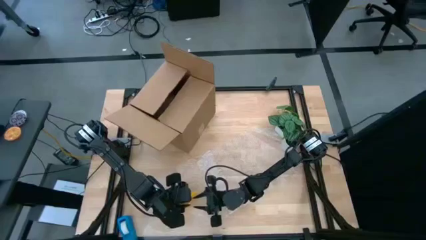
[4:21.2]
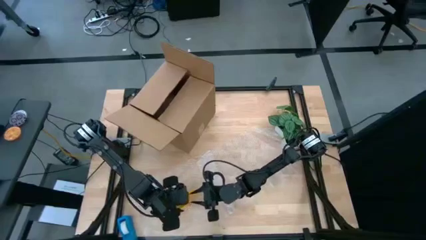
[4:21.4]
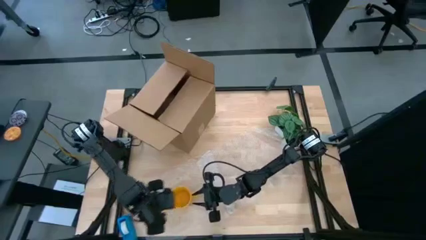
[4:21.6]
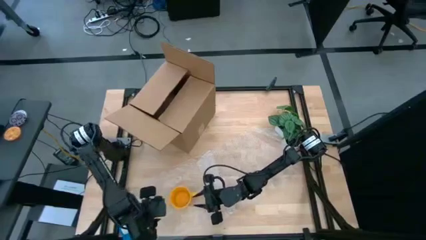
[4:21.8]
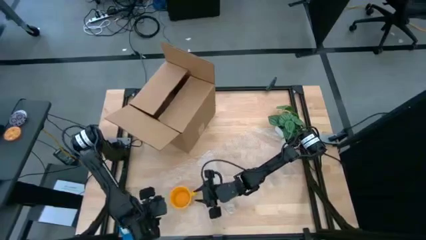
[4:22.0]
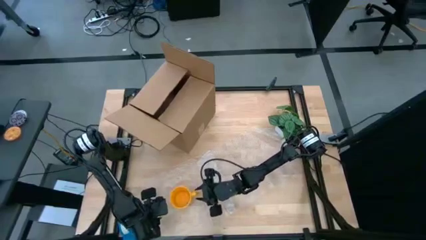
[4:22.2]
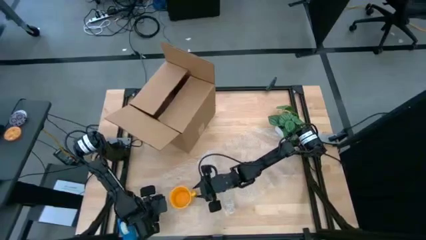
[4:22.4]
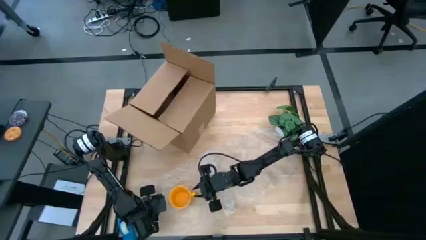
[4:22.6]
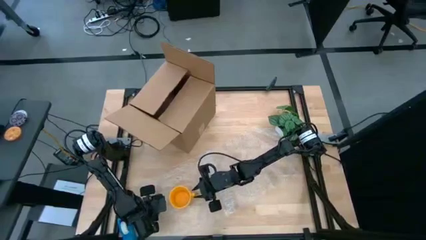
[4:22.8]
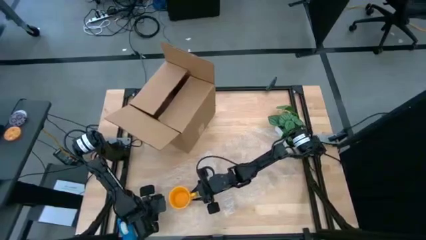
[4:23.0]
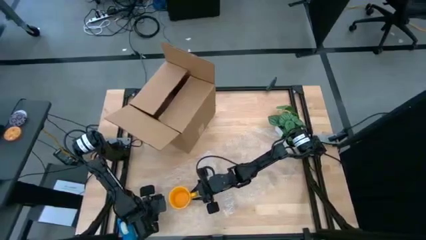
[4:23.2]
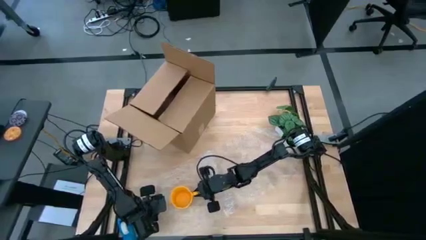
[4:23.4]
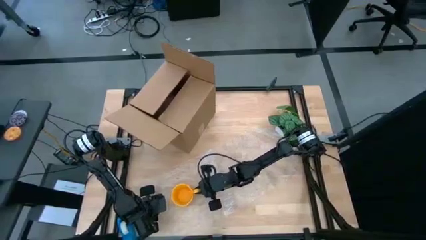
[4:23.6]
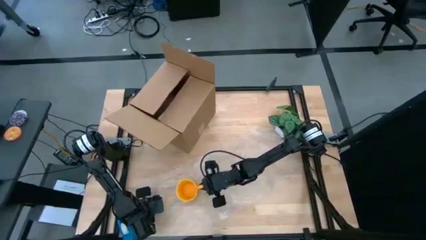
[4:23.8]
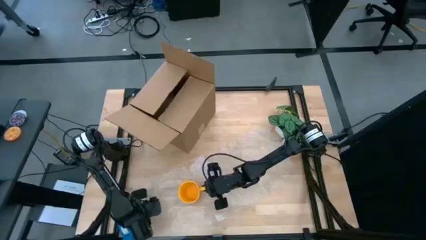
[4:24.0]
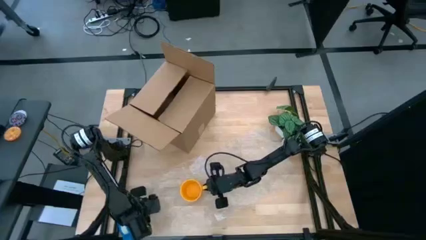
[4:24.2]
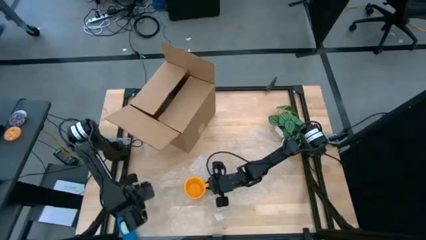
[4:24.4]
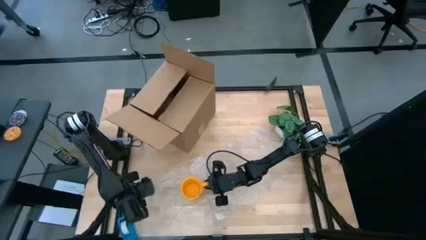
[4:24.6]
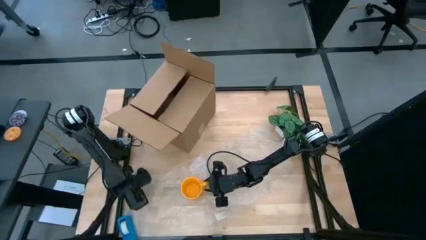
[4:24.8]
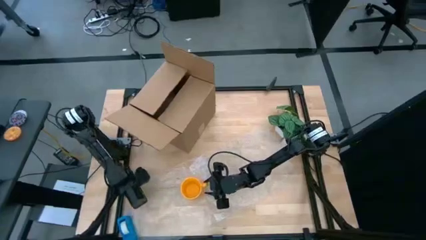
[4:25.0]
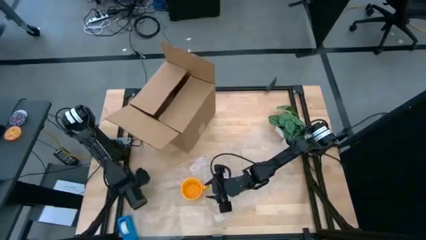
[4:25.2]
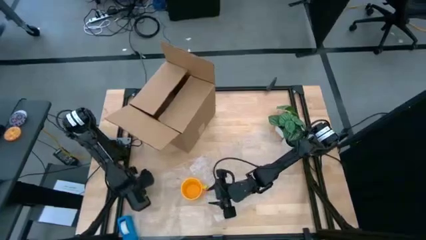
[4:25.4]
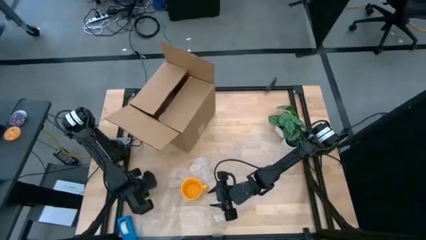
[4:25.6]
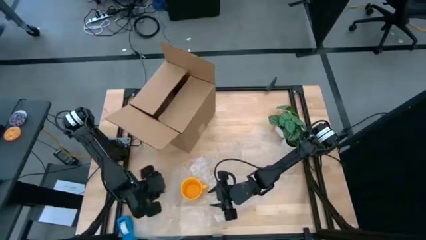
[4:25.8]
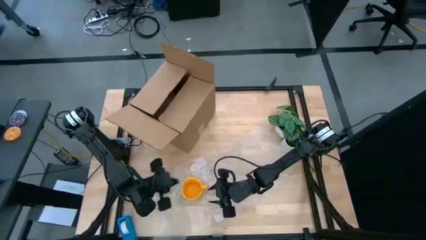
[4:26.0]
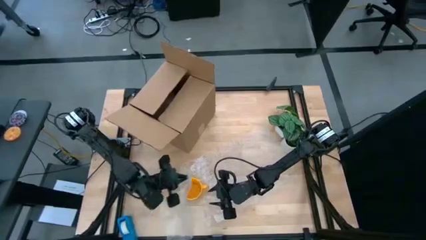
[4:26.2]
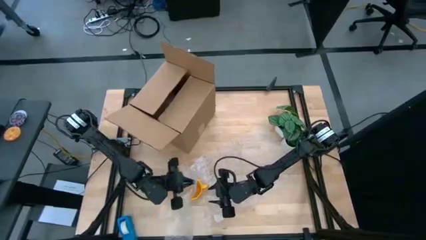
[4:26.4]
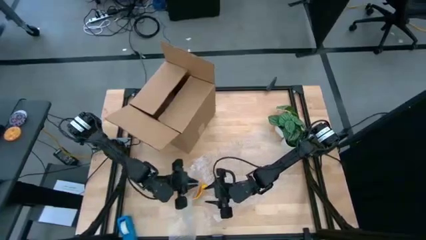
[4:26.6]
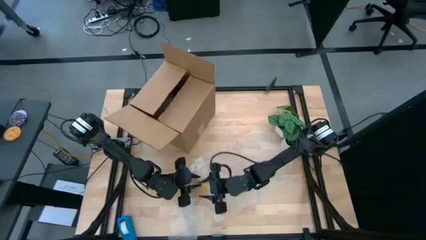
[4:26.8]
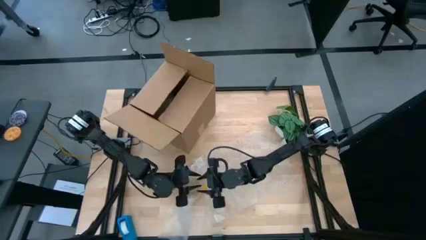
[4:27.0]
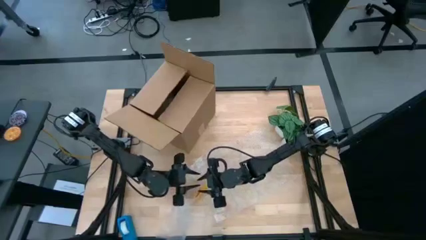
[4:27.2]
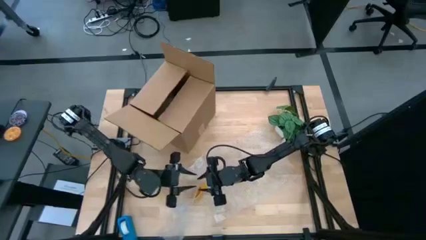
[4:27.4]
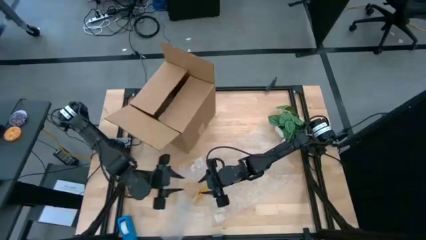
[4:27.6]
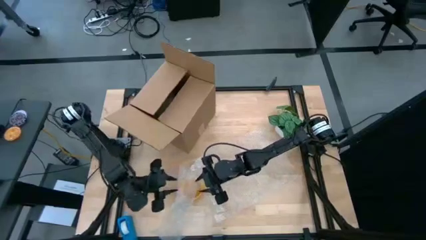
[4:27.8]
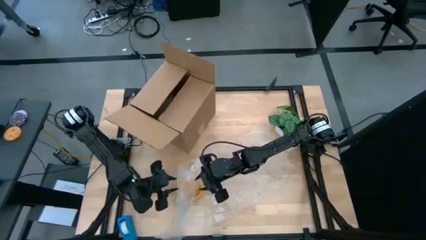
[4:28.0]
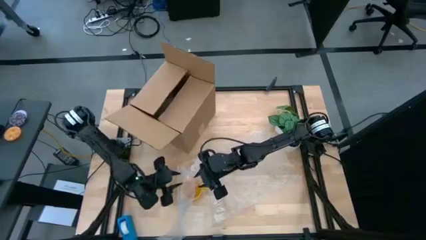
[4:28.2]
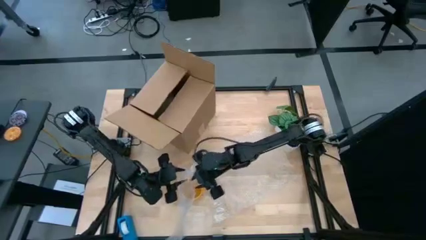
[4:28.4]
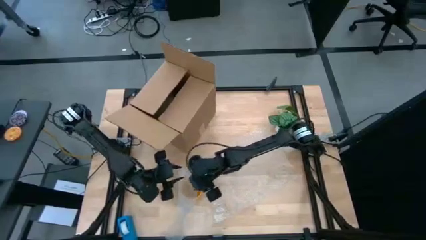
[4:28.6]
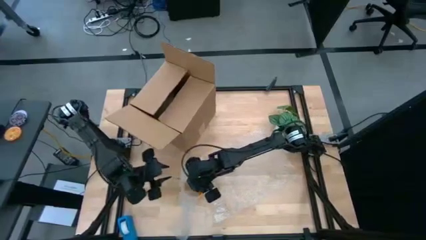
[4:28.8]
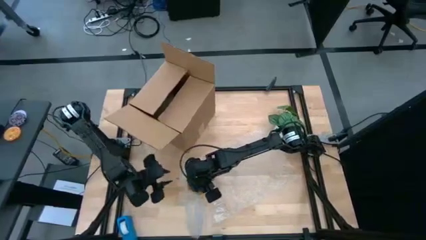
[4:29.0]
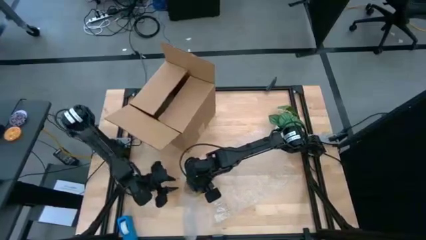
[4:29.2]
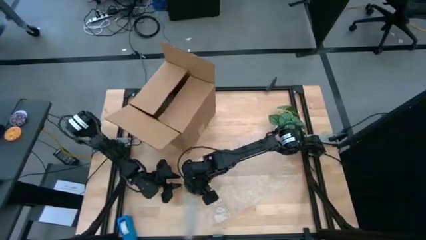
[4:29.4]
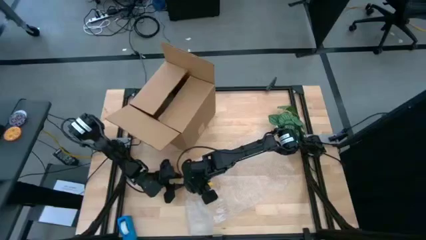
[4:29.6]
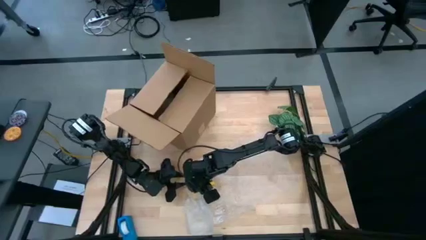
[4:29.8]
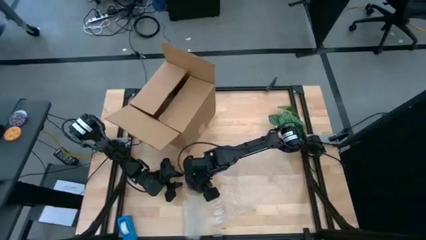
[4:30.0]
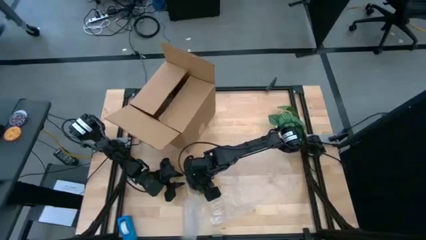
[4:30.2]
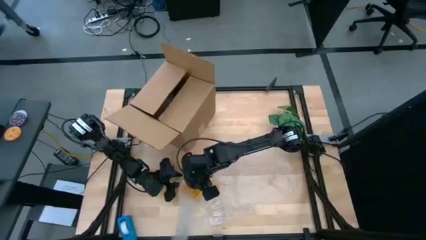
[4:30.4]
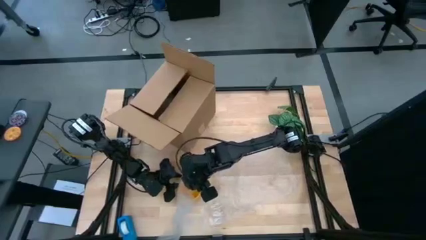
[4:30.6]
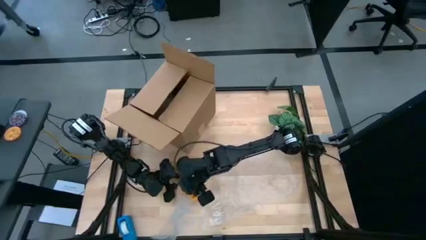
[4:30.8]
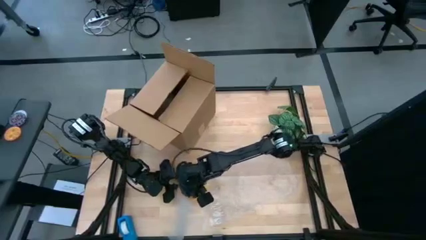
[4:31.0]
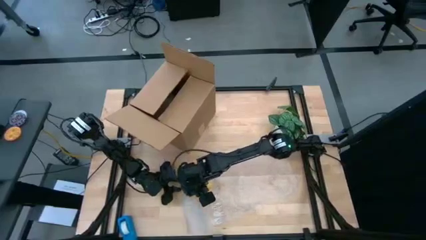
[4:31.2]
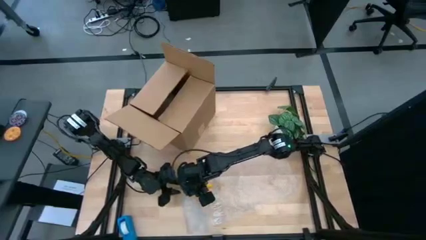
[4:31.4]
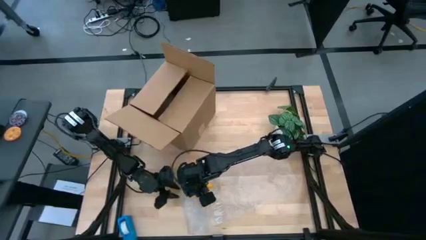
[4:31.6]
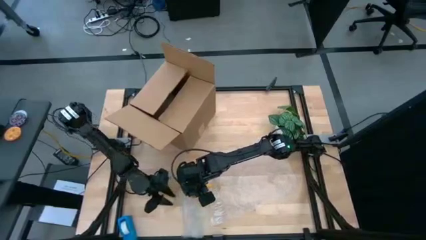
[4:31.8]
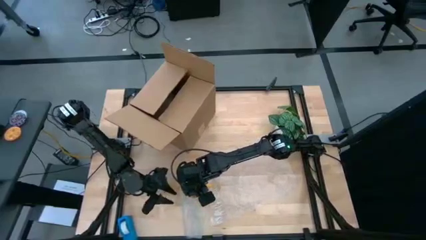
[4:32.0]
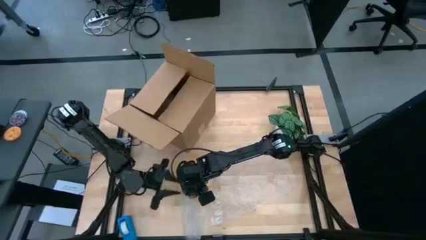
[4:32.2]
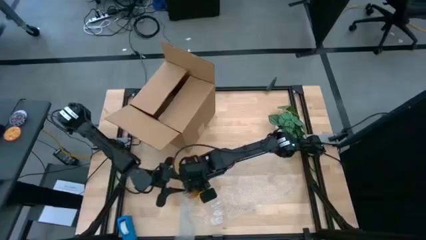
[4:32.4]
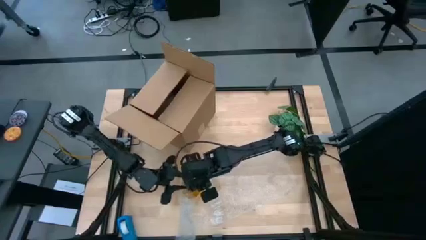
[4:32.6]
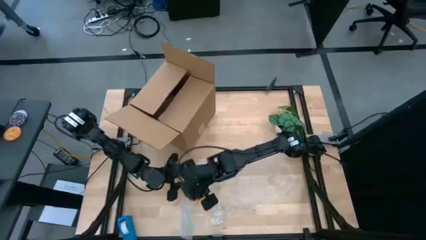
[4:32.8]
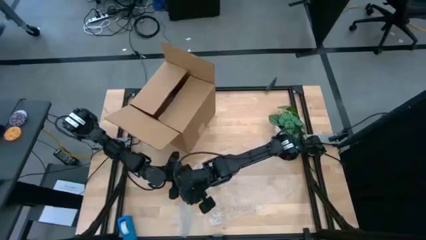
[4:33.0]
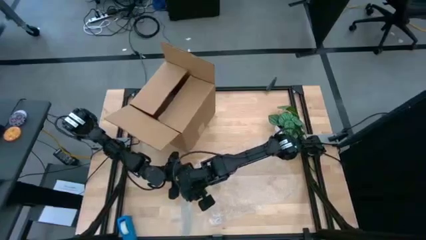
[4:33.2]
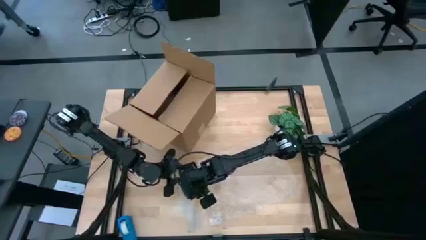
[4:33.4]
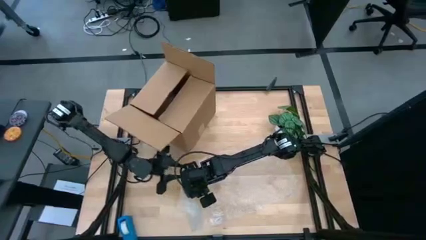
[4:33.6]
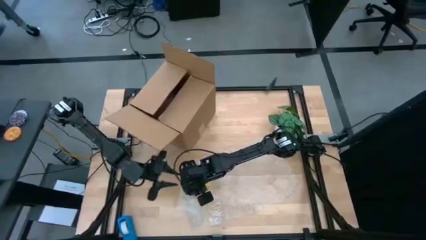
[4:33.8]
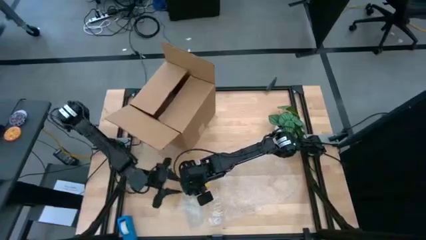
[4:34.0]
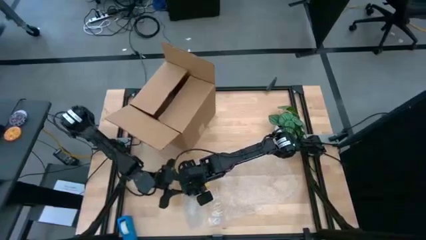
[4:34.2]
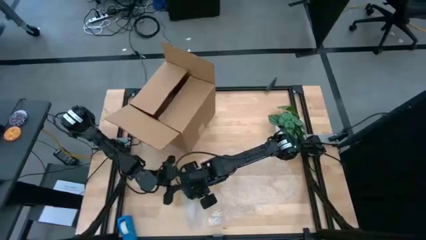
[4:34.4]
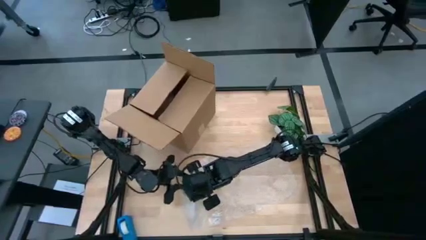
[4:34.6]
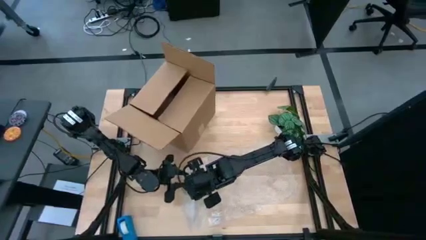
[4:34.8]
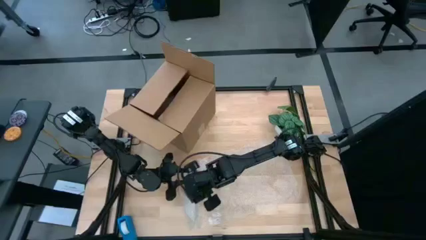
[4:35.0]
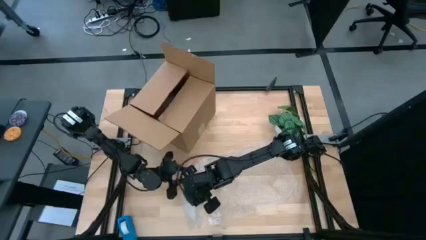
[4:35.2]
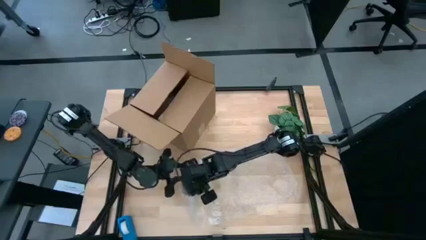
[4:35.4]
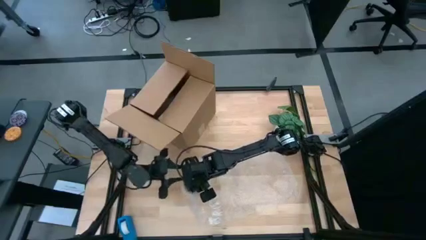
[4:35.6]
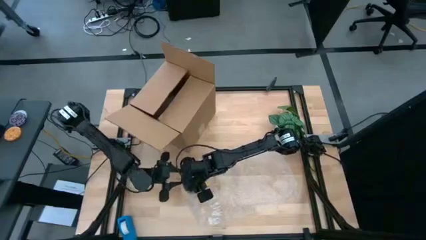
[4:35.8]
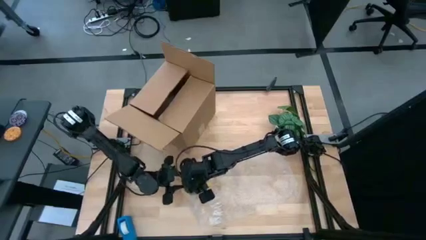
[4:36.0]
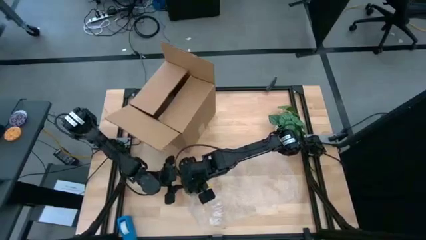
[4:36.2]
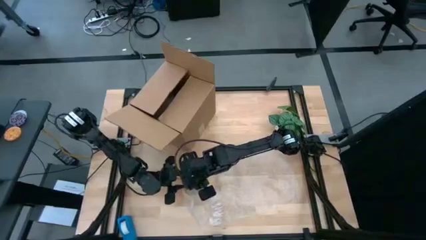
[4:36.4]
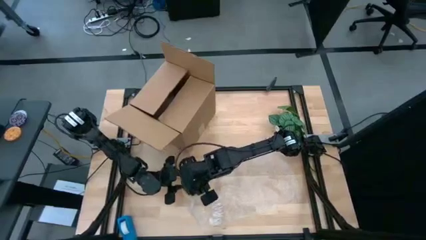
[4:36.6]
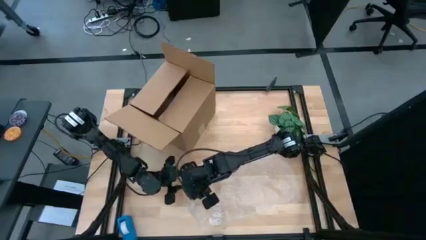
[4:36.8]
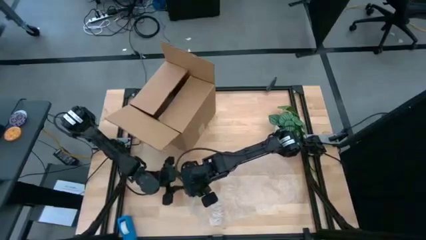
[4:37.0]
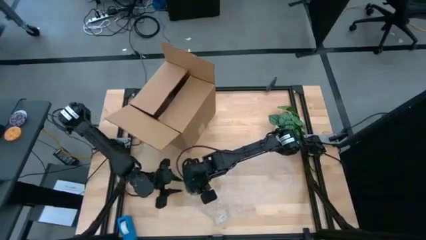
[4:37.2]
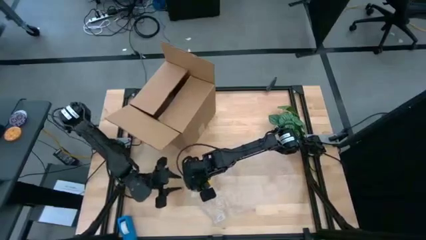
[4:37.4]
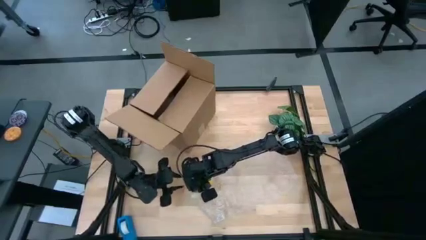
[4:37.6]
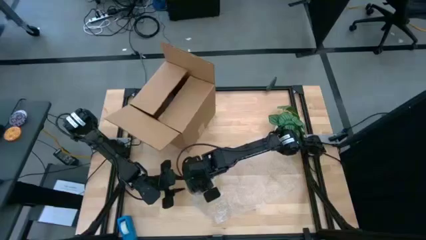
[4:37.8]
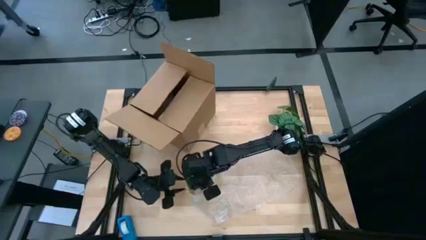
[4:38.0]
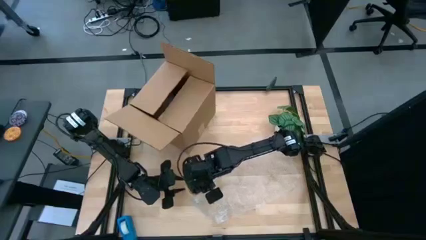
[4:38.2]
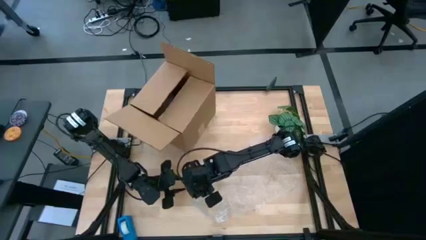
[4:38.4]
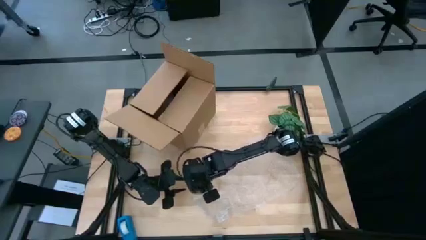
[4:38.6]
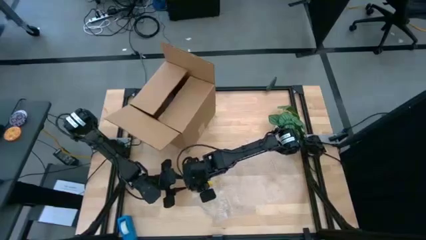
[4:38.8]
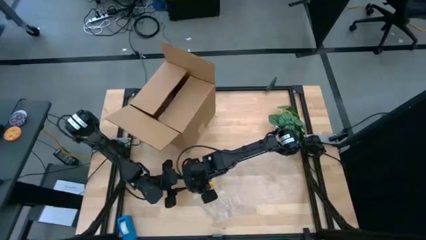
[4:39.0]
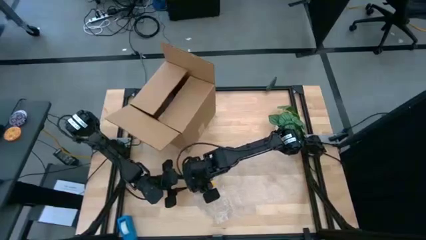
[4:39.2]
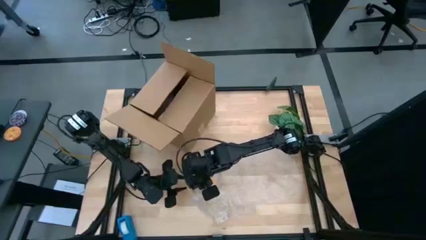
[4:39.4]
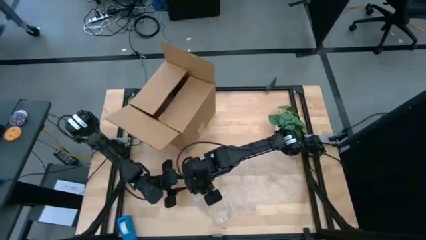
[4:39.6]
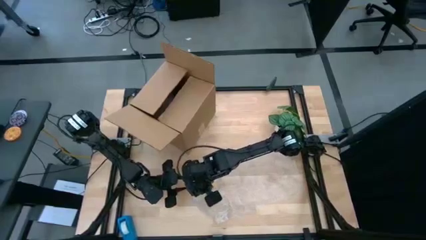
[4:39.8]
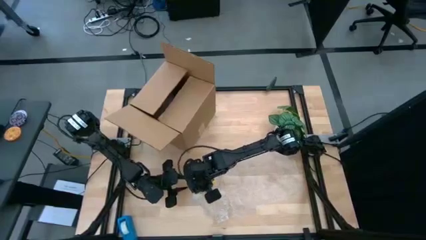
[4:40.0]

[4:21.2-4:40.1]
Task: wrap mug
Wrap the yellow mug with the bubble wrap
